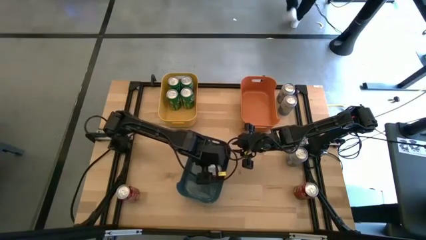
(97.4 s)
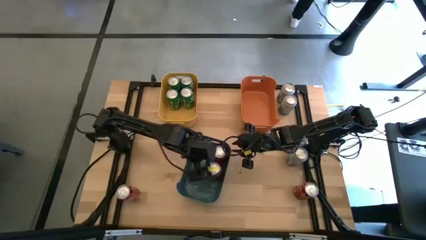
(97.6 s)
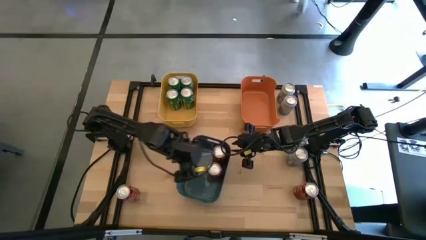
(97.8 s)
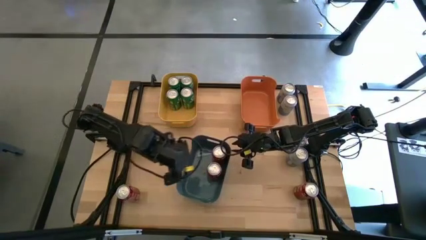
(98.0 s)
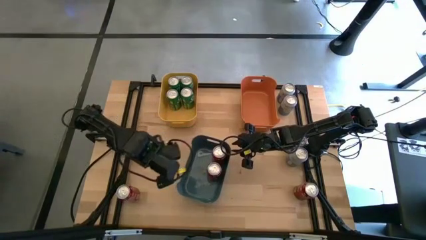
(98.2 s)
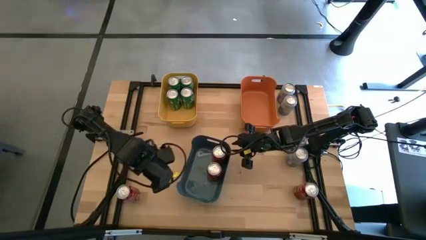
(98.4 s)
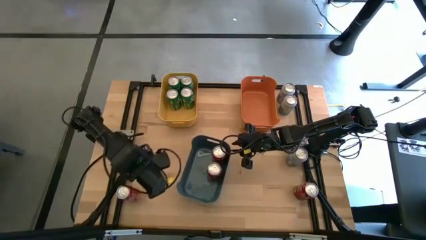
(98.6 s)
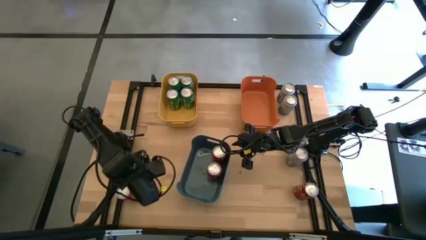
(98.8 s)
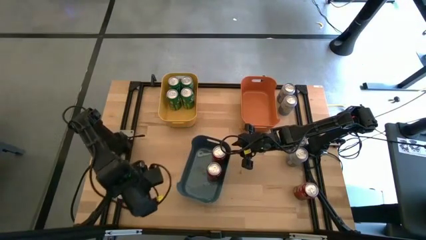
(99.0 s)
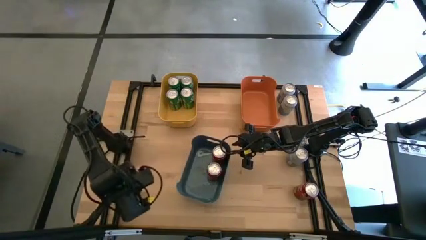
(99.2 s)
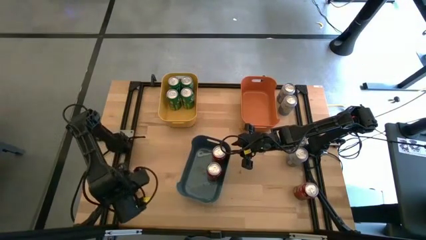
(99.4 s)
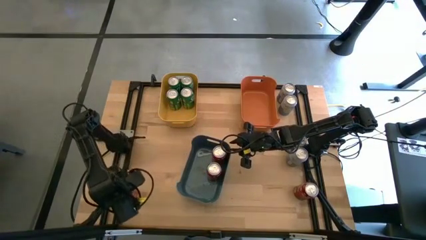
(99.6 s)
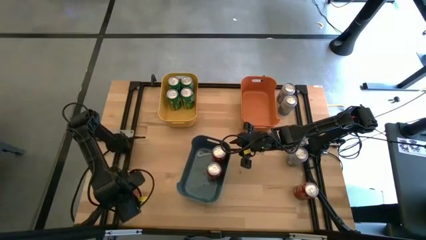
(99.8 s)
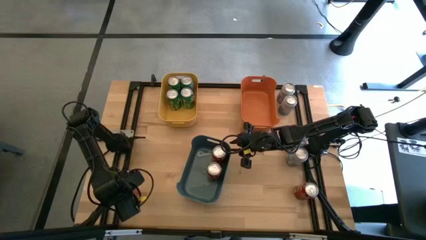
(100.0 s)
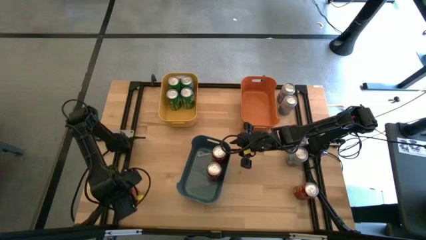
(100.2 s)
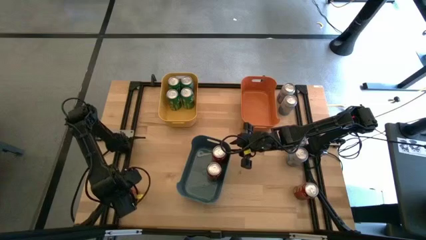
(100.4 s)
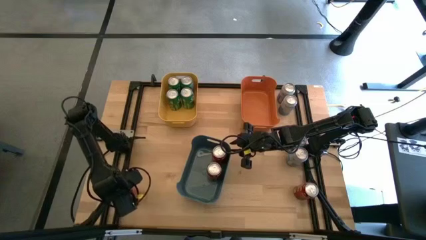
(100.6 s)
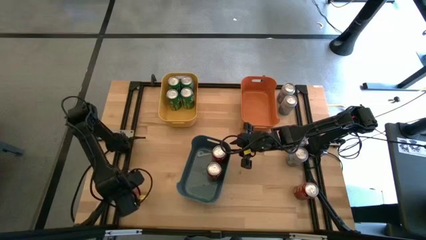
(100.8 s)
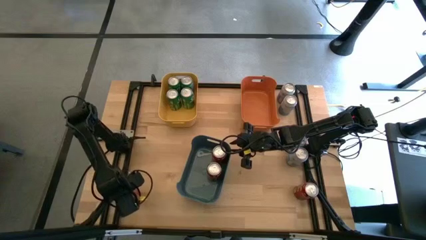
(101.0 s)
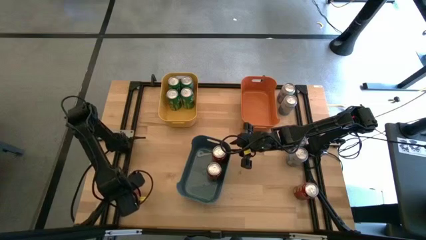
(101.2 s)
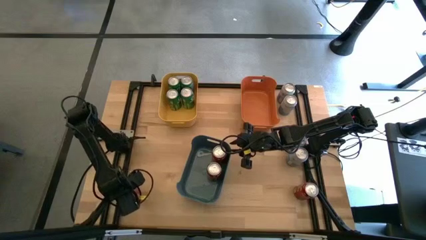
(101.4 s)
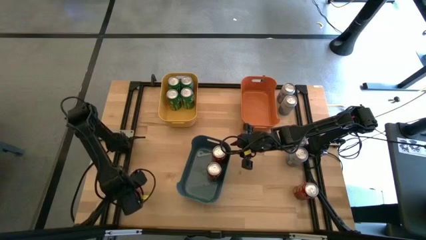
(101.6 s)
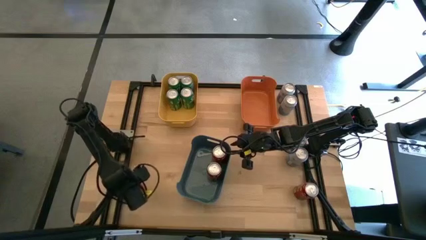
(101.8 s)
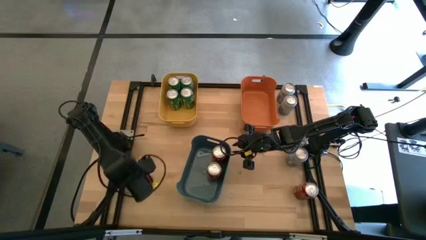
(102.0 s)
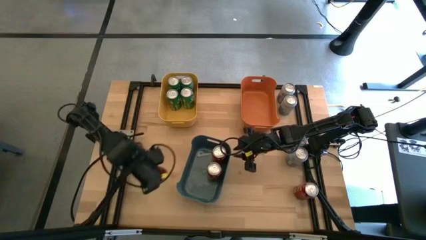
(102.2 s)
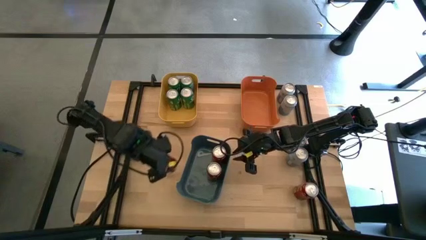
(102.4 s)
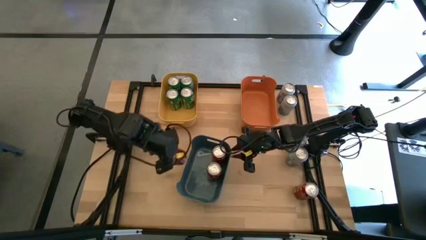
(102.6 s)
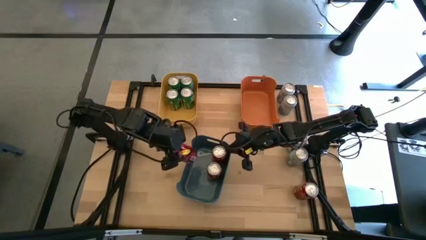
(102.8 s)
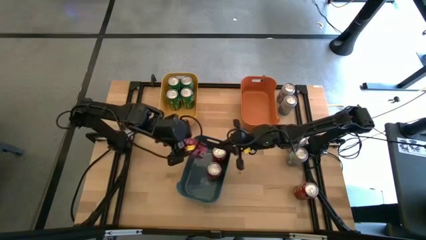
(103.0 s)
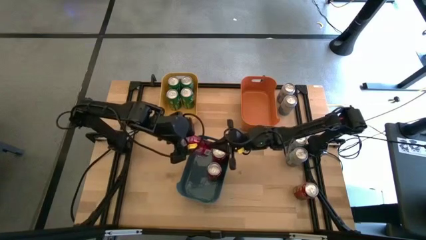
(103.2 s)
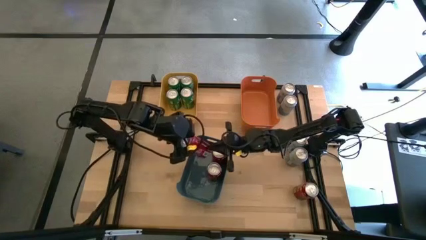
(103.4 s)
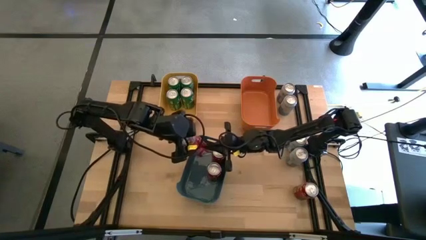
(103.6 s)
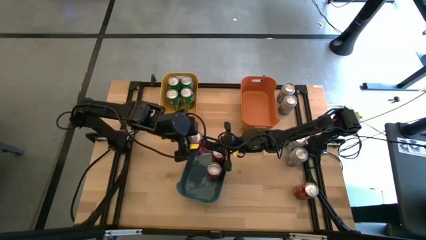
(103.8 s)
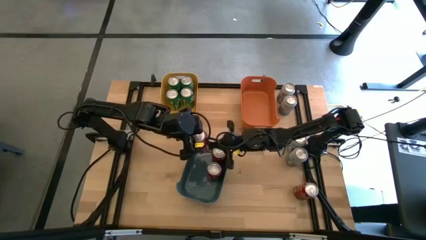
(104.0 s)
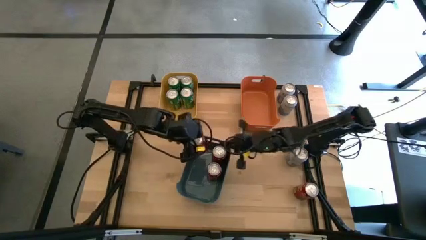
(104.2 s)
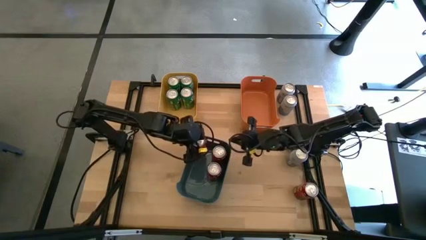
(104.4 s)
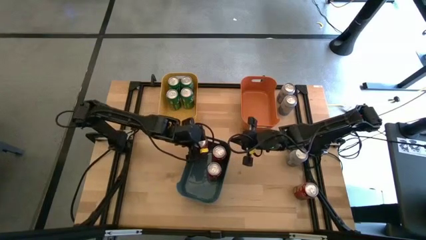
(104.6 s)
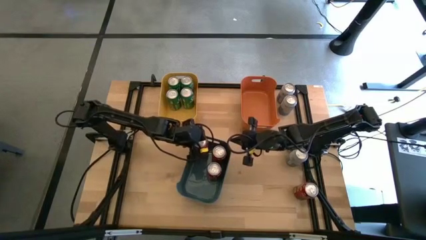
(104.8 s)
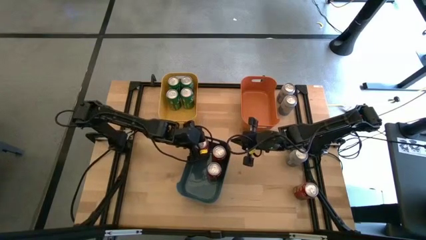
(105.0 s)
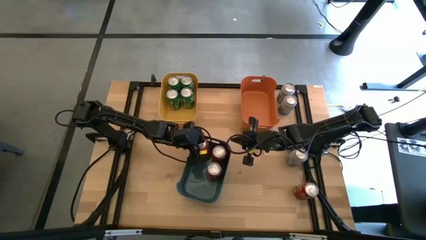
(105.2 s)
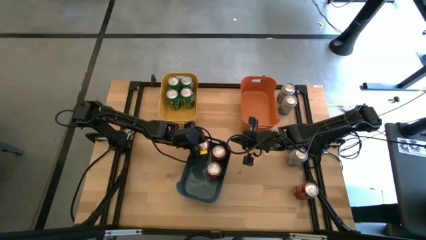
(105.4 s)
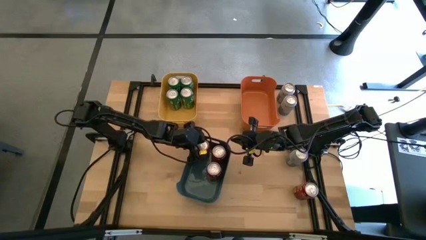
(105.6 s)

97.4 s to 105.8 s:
Task: Sort soda cans
Put the red soda can into the blue bin

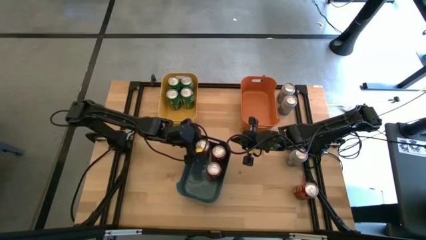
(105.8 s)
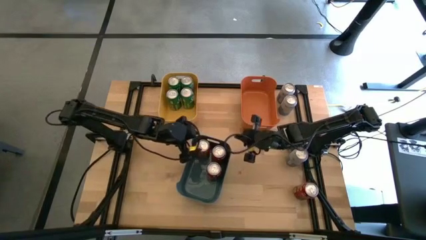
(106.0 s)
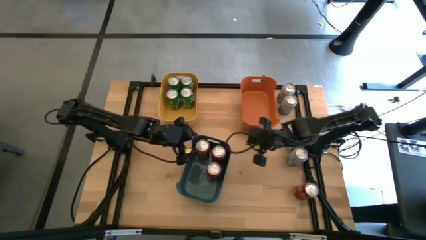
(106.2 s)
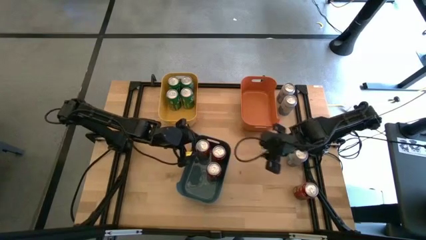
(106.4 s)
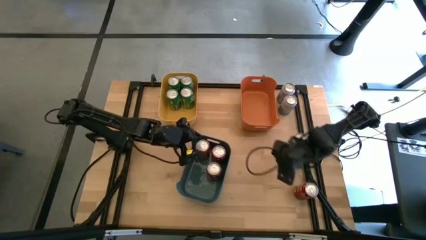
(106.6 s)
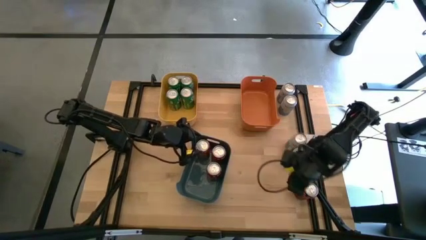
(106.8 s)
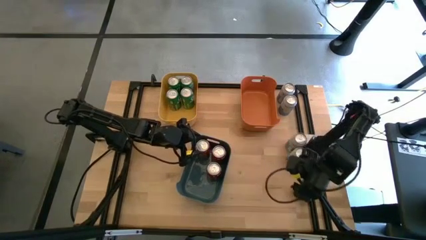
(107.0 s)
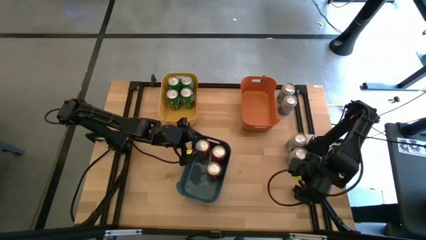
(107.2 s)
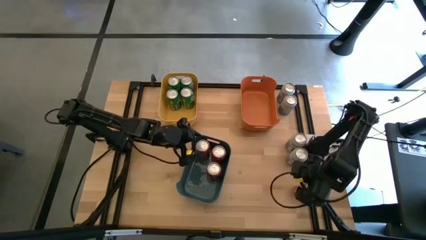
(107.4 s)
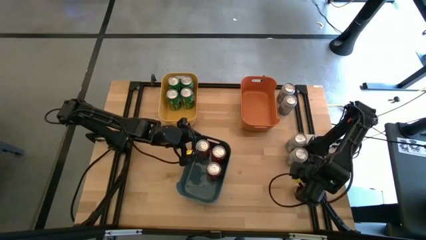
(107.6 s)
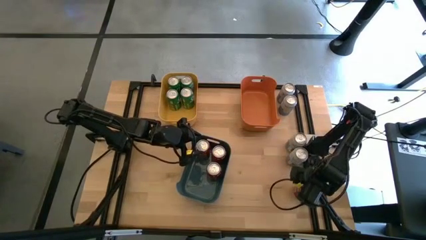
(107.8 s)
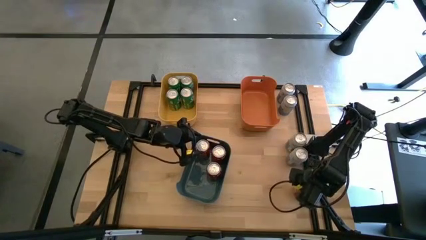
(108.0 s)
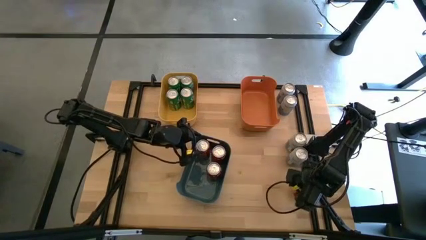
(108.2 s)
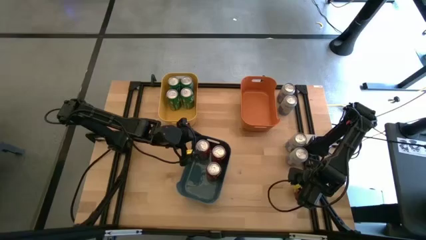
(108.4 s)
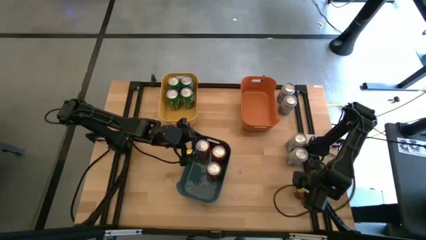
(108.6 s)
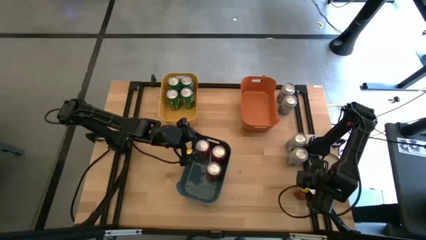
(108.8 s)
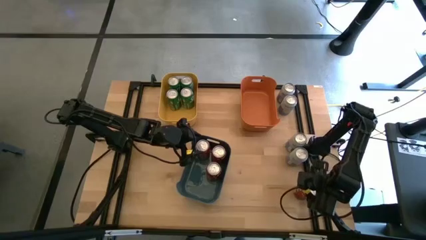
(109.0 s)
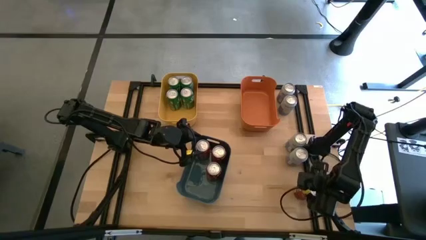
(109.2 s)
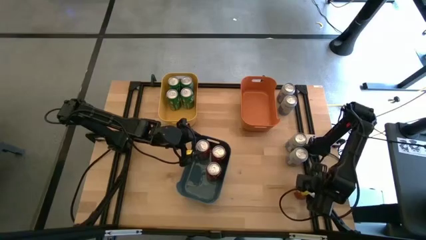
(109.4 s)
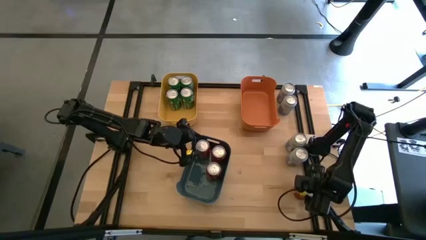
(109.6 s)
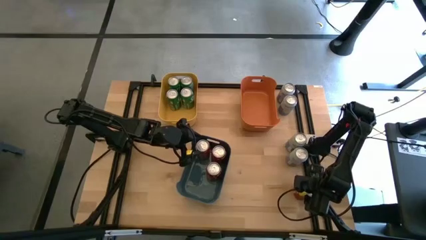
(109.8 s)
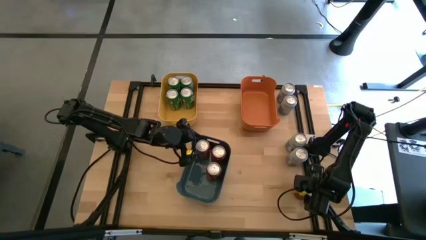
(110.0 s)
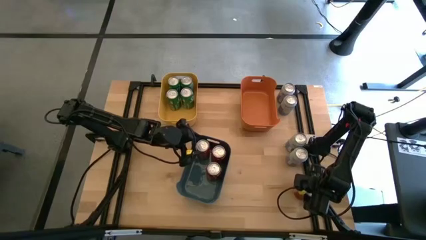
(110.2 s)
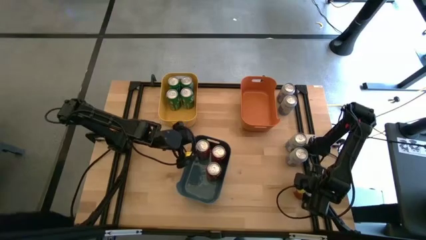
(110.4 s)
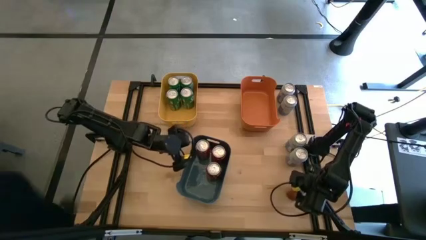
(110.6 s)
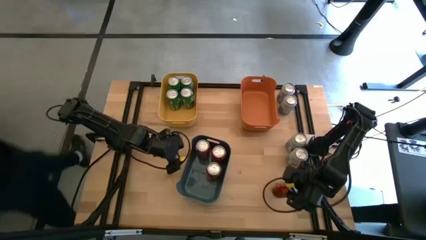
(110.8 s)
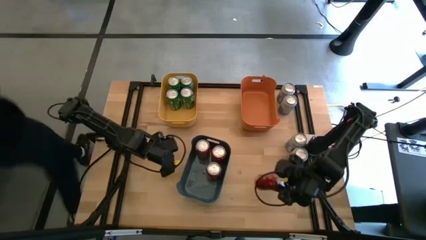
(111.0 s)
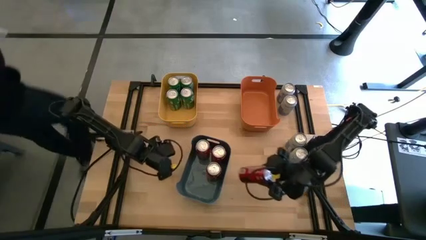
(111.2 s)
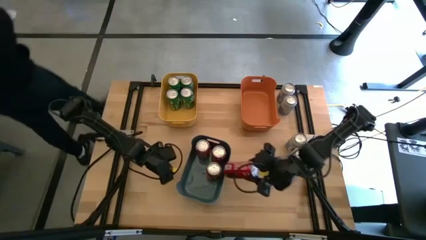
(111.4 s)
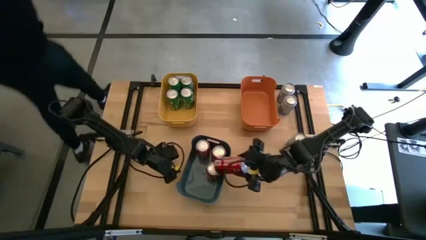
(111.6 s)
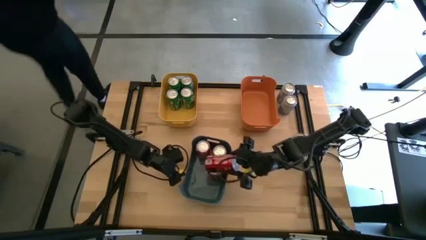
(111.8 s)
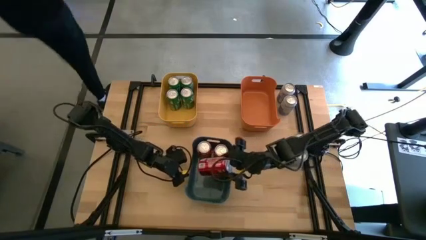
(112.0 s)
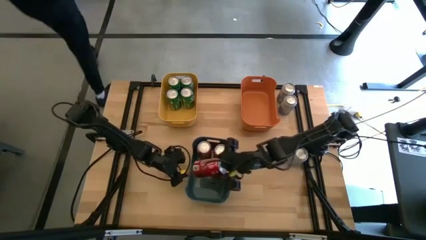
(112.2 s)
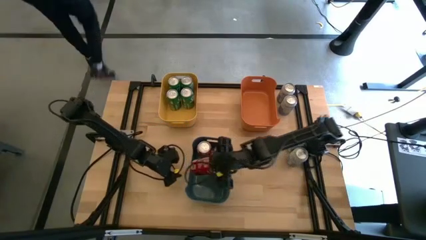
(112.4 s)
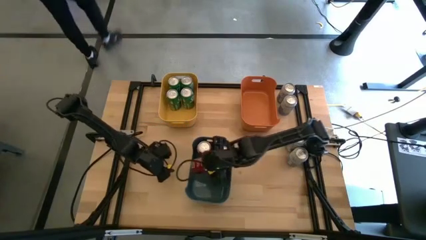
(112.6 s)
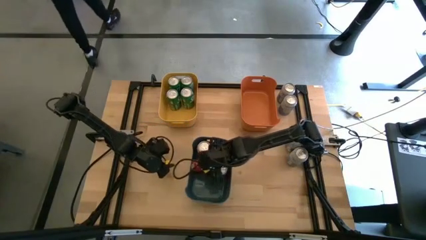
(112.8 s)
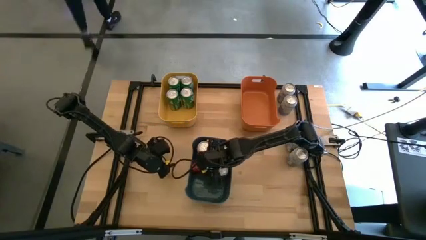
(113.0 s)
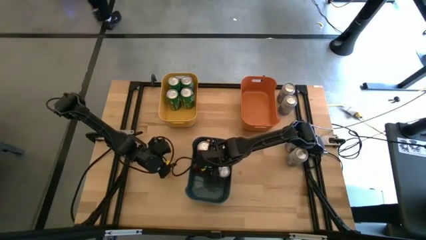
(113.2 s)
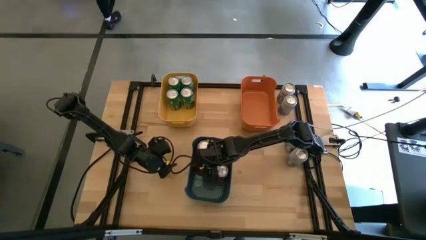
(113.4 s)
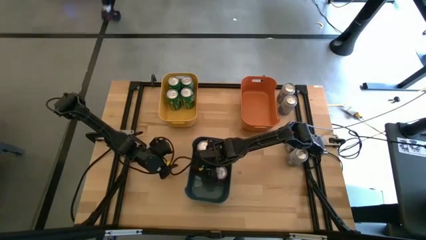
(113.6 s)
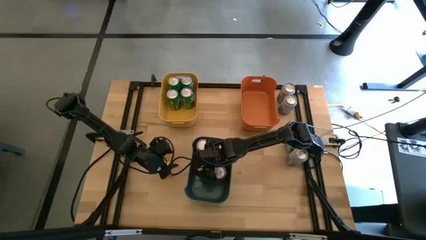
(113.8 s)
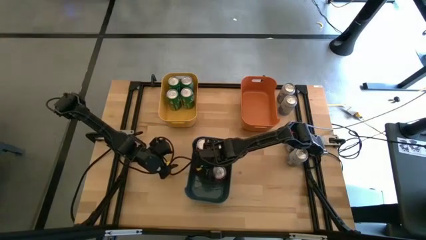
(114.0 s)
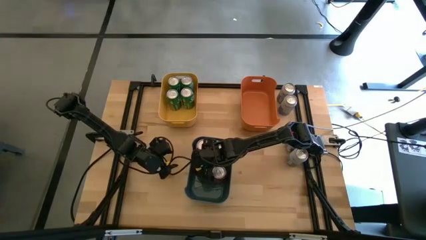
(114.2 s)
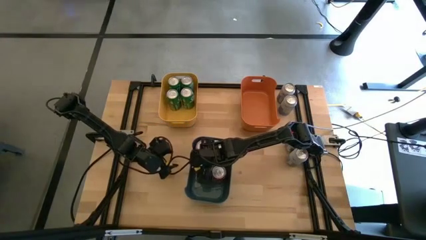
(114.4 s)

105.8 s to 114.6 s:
Put the red soda can into the blue bin
